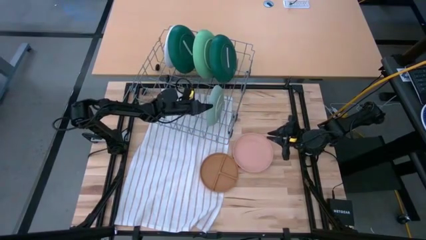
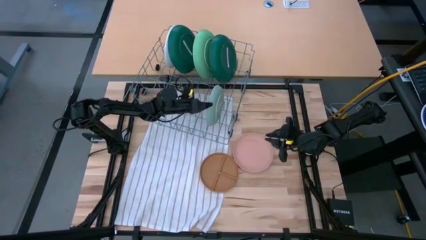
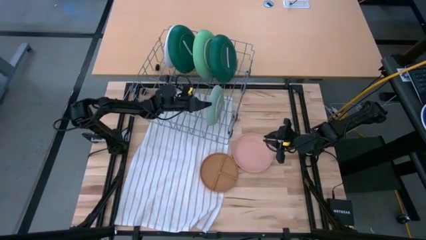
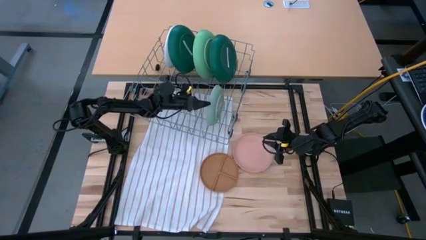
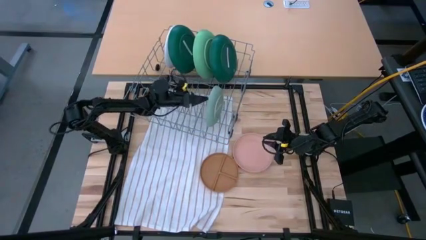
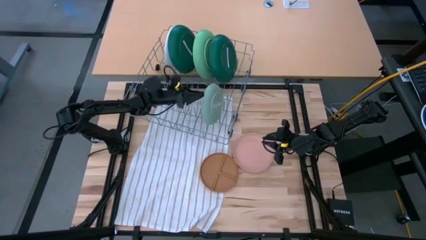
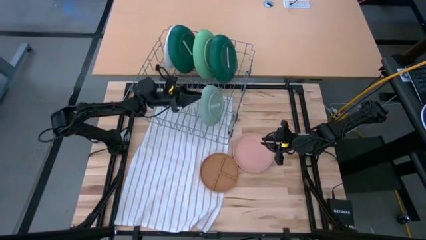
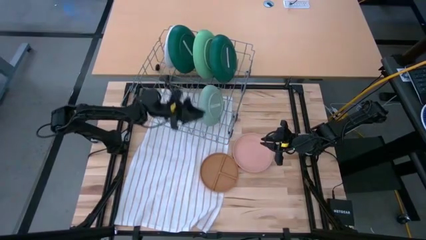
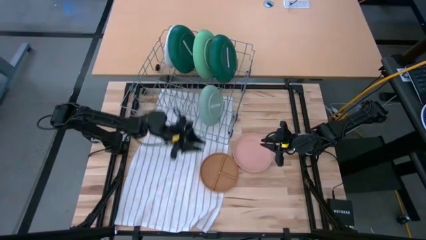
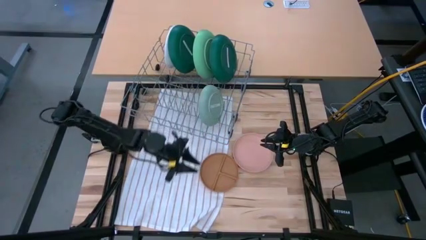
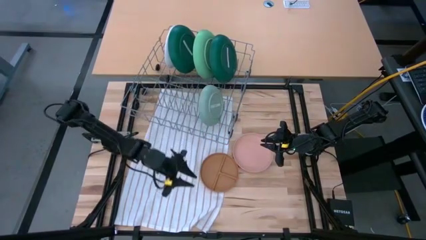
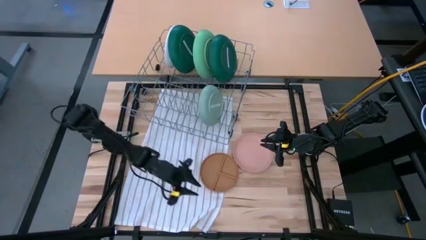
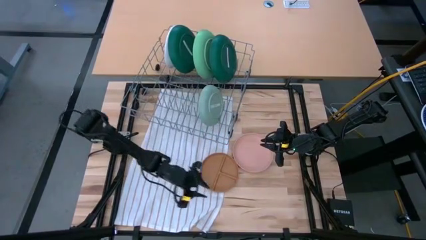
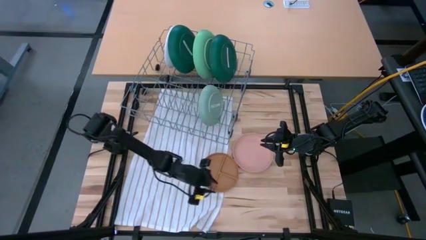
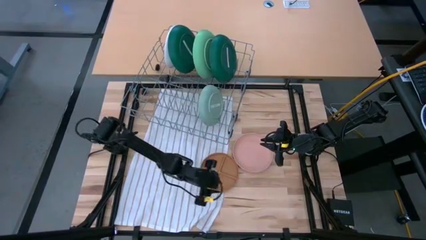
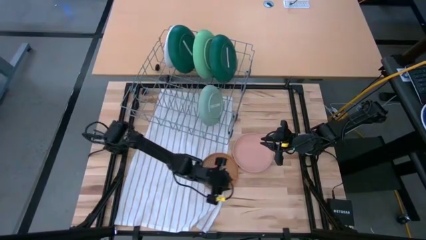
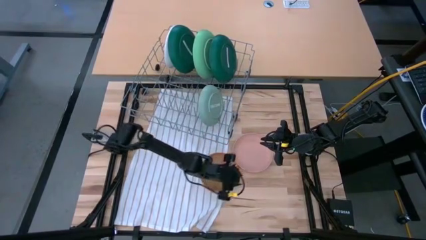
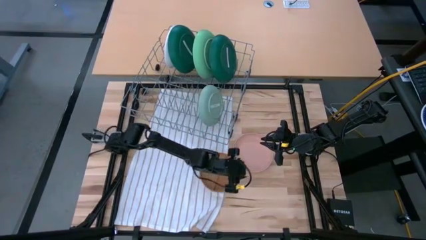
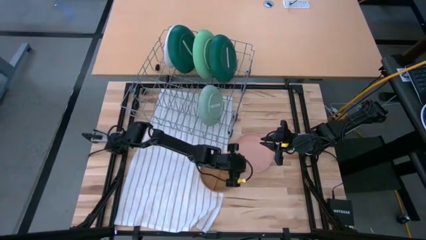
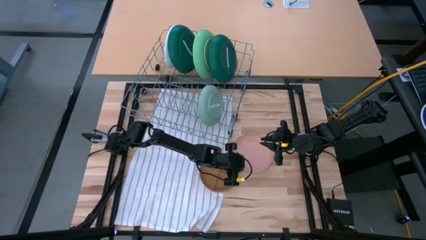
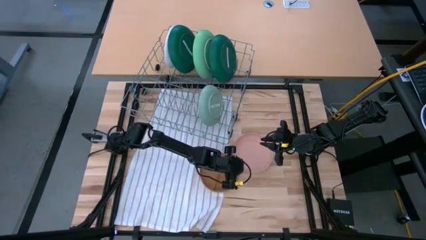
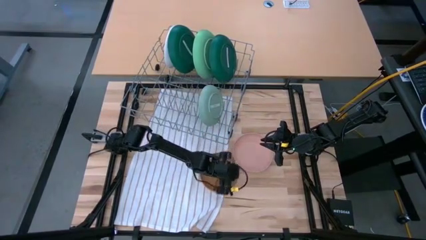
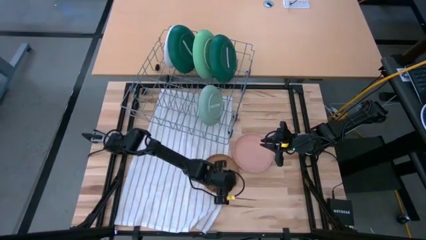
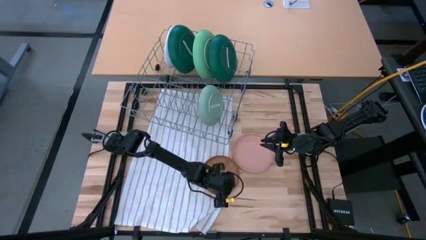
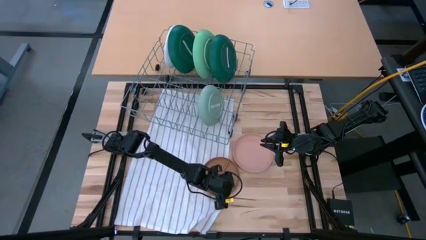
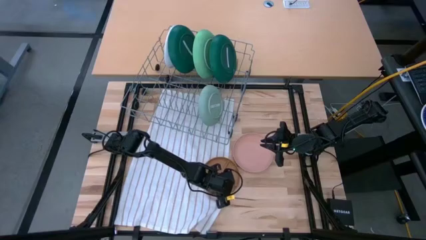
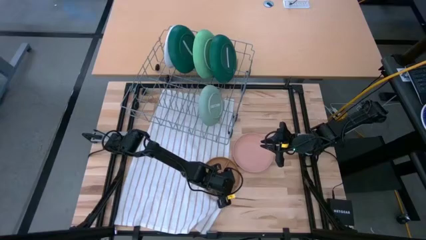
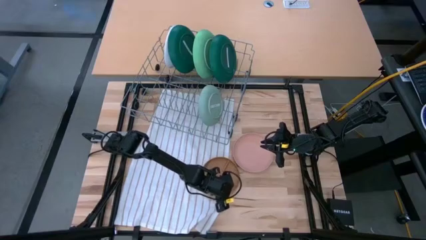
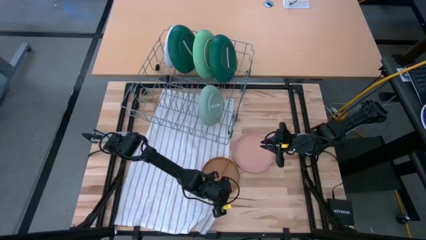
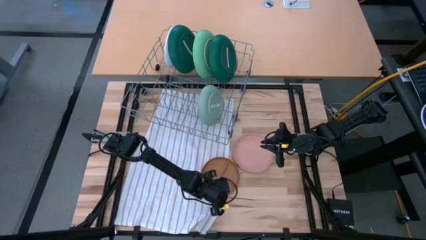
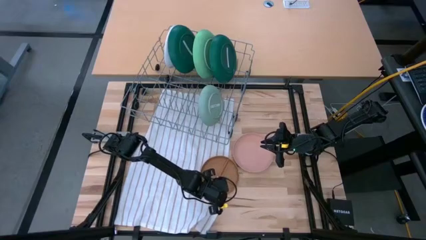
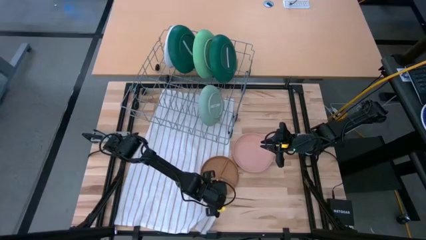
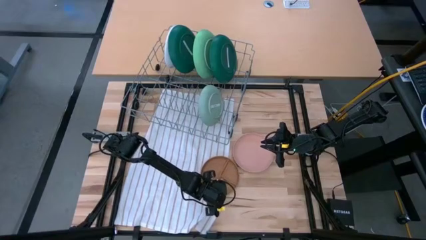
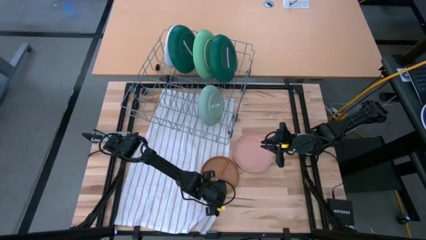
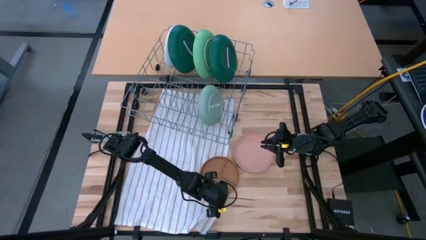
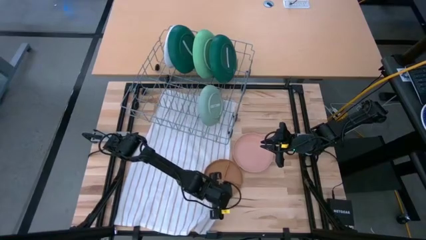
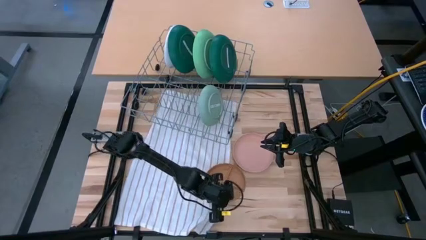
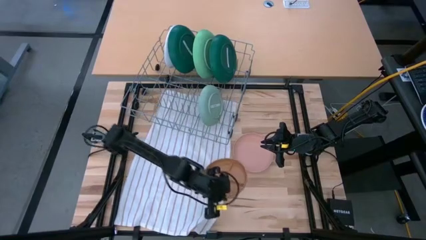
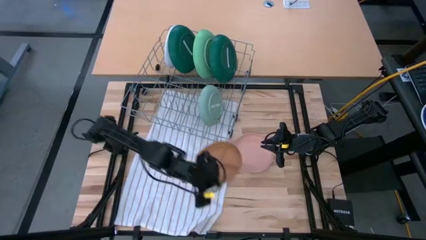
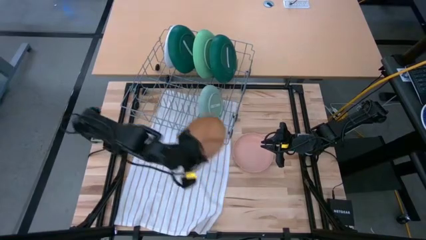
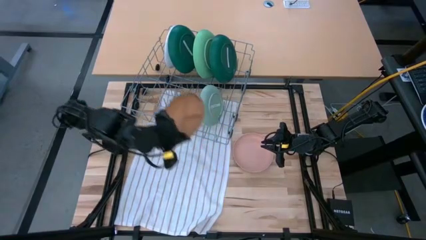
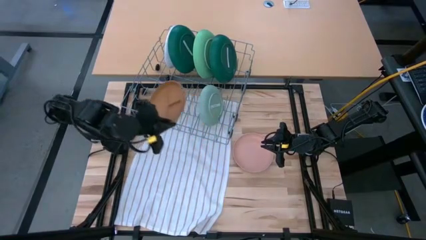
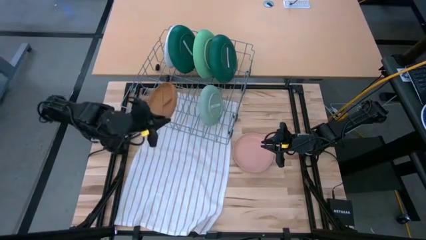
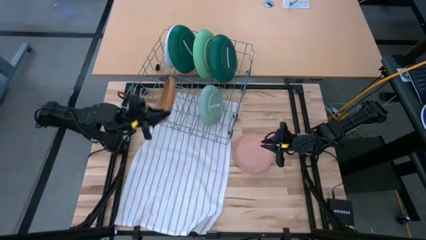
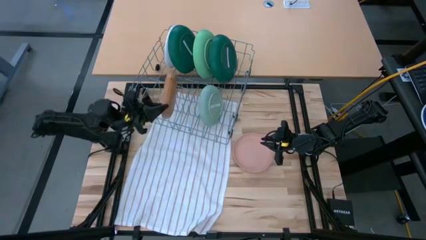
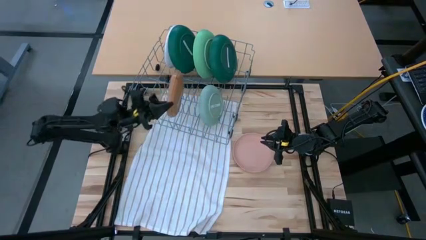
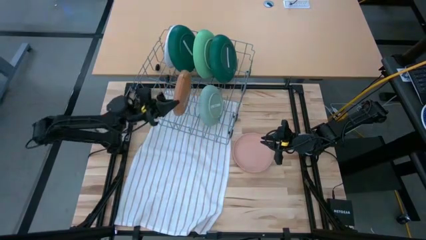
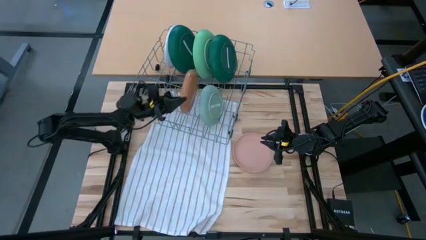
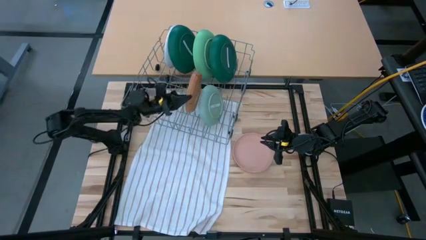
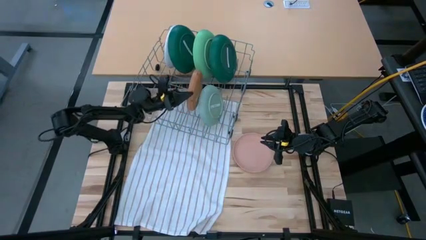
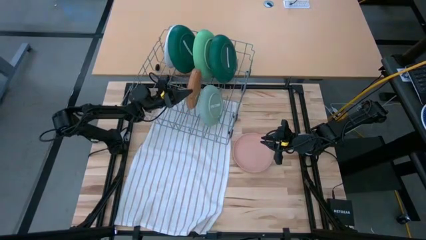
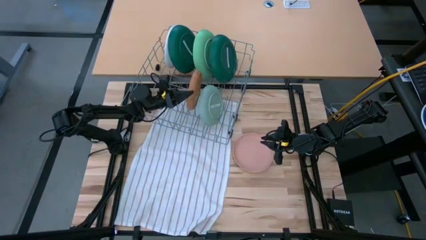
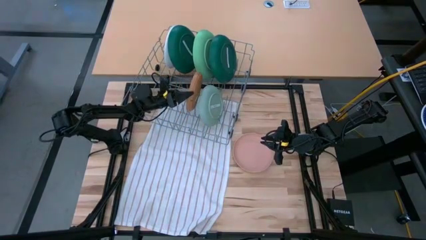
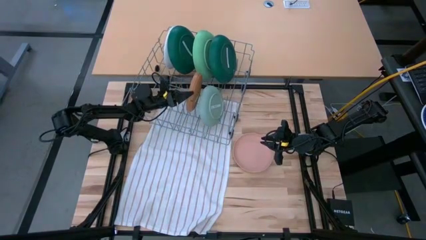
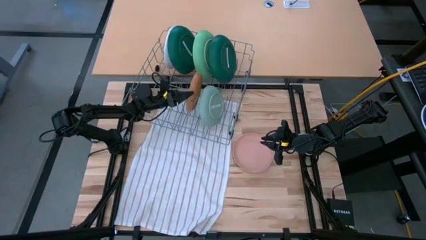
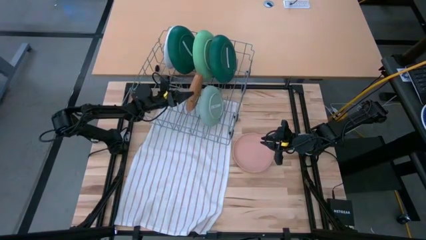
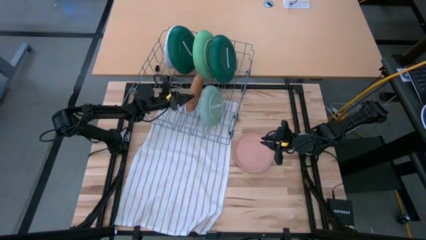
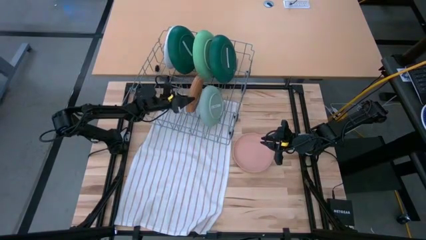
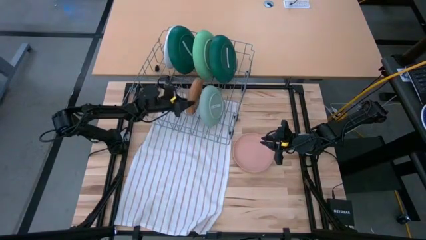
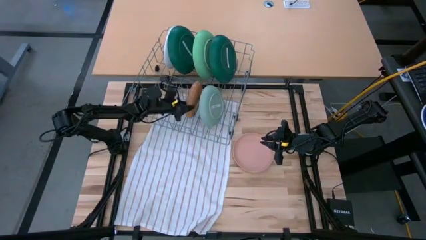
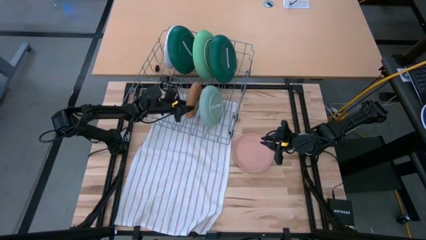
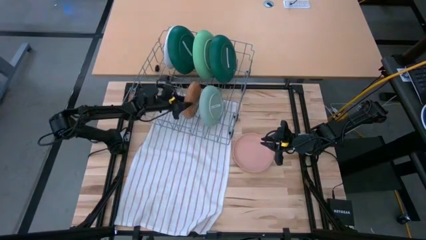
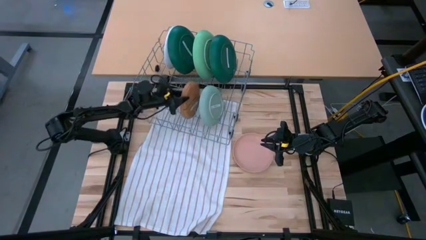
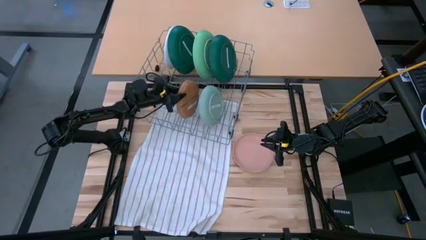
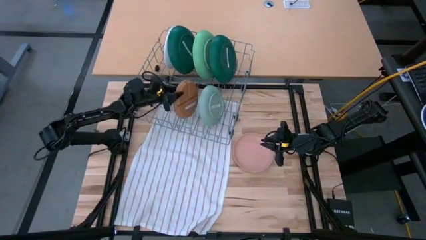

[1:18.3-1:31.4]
Task: Sort dishes
Put the orange plate into the dishwasher rack
